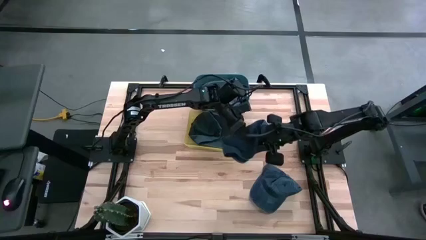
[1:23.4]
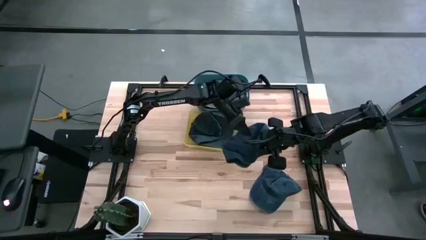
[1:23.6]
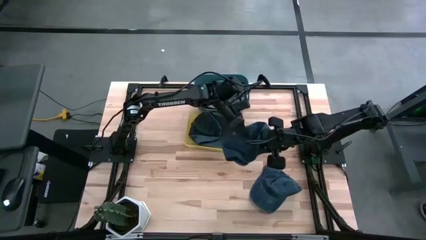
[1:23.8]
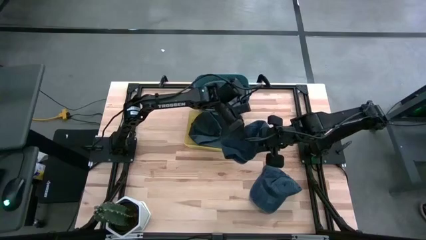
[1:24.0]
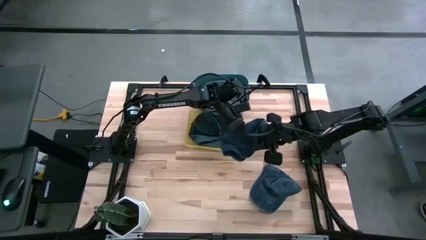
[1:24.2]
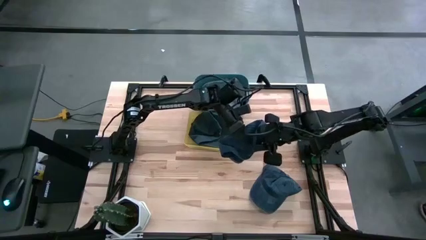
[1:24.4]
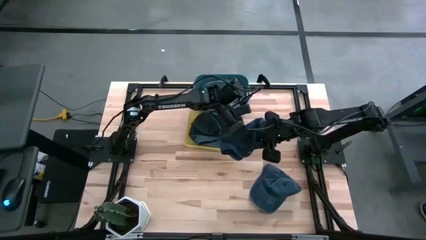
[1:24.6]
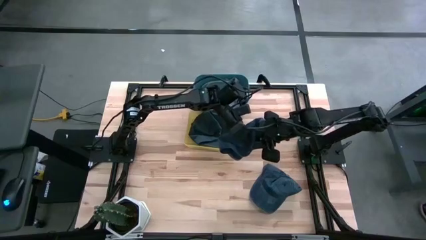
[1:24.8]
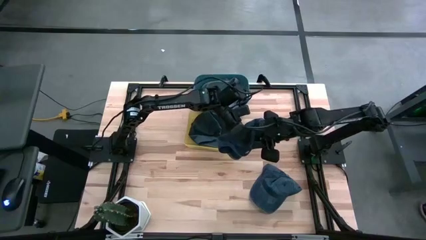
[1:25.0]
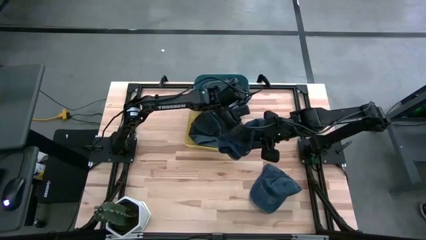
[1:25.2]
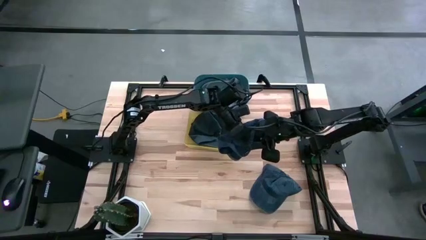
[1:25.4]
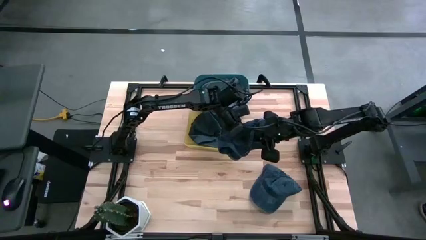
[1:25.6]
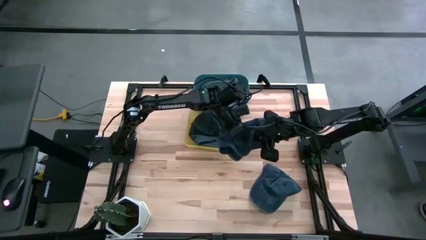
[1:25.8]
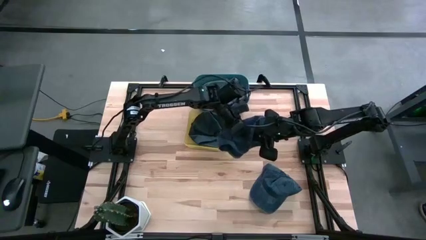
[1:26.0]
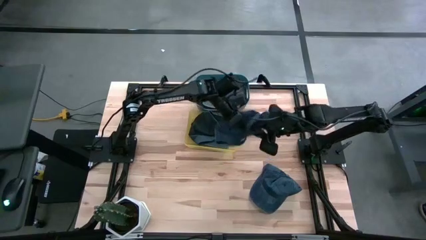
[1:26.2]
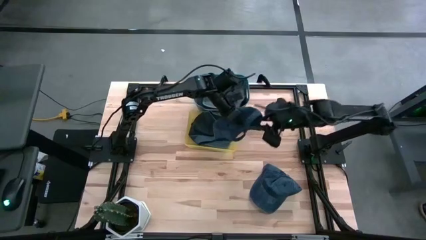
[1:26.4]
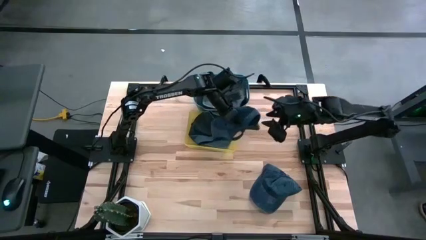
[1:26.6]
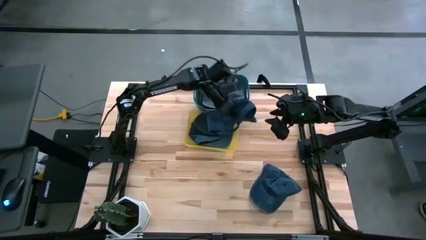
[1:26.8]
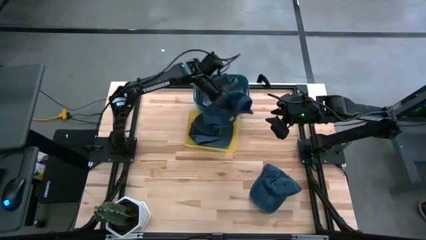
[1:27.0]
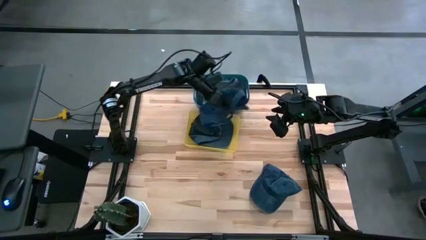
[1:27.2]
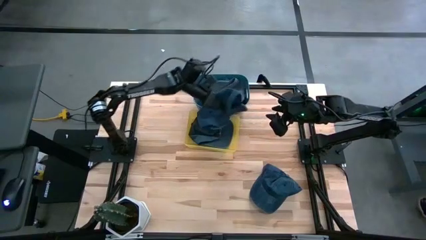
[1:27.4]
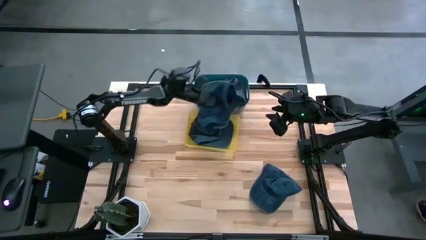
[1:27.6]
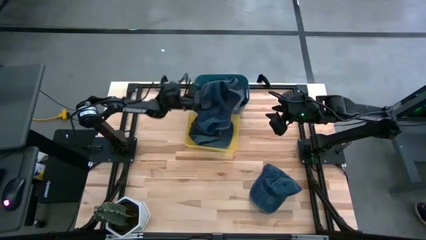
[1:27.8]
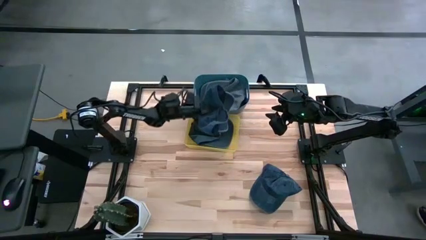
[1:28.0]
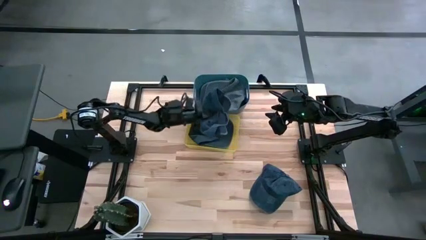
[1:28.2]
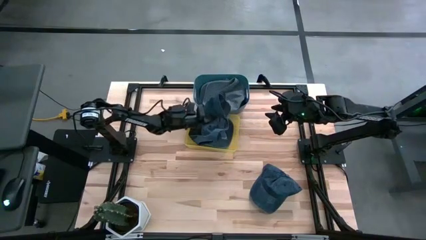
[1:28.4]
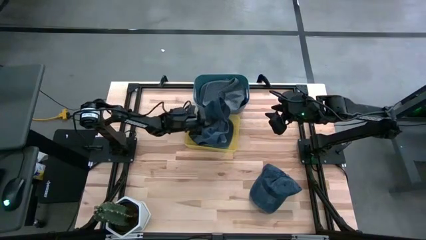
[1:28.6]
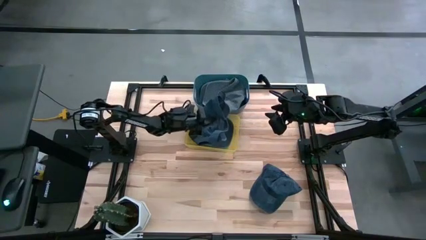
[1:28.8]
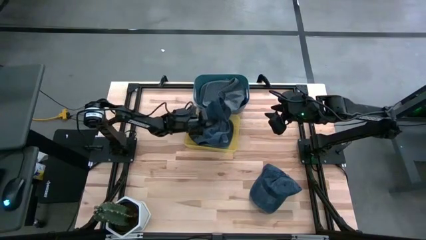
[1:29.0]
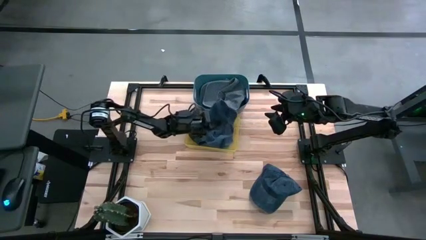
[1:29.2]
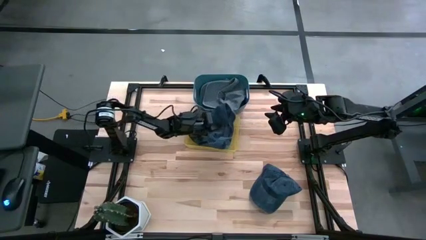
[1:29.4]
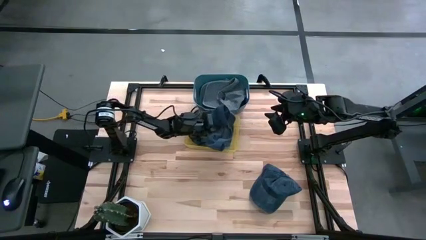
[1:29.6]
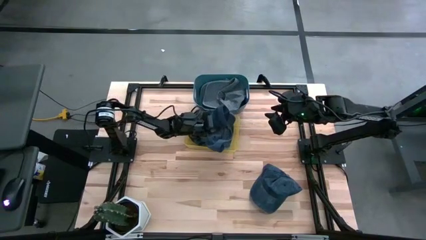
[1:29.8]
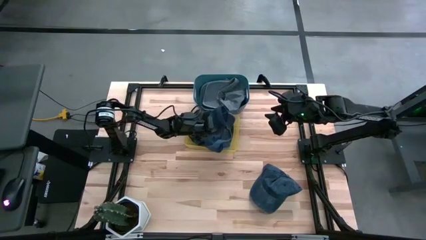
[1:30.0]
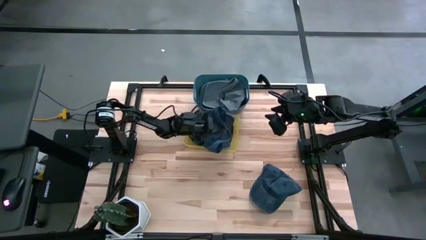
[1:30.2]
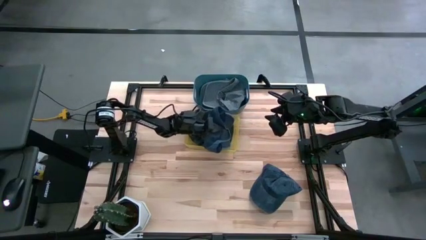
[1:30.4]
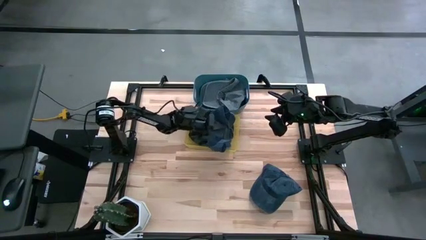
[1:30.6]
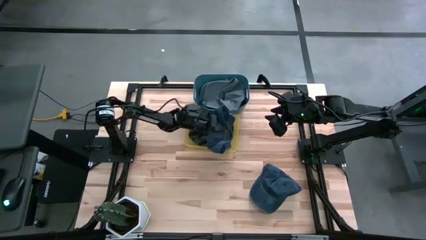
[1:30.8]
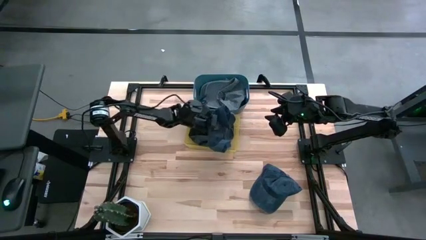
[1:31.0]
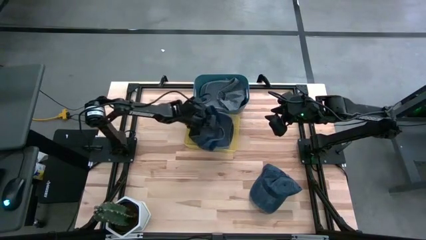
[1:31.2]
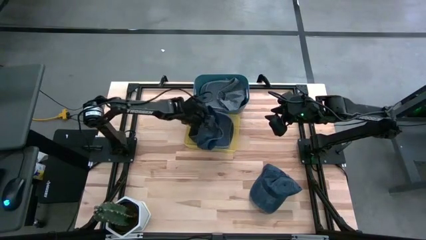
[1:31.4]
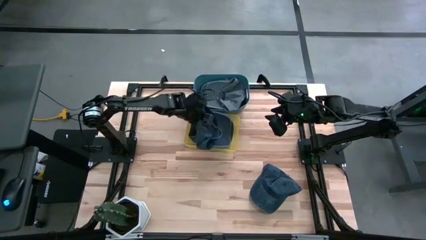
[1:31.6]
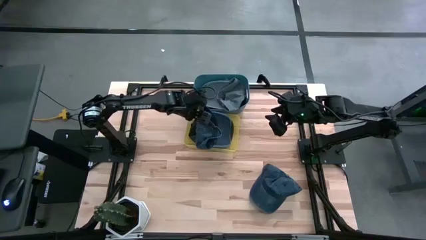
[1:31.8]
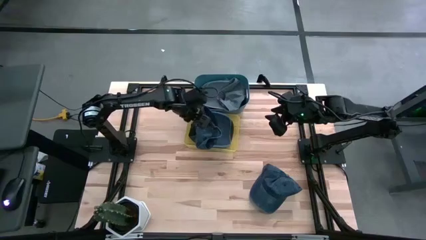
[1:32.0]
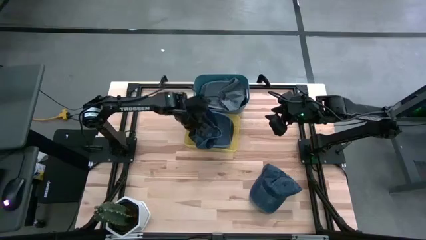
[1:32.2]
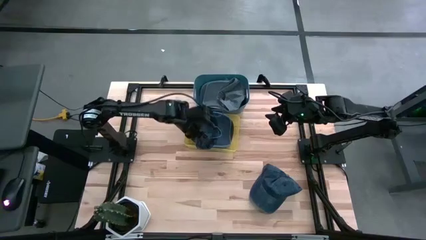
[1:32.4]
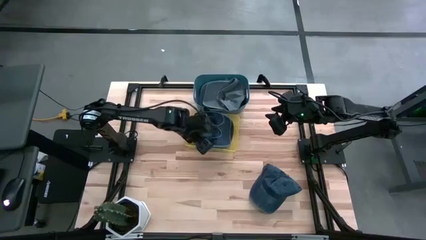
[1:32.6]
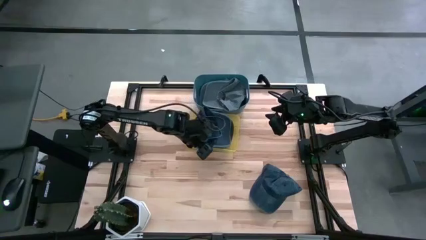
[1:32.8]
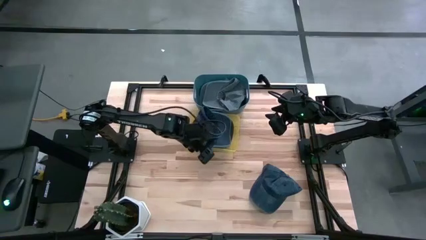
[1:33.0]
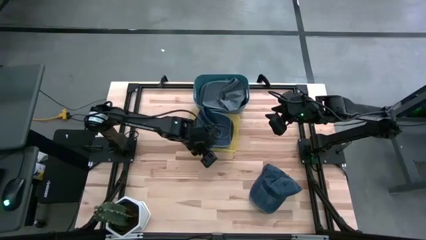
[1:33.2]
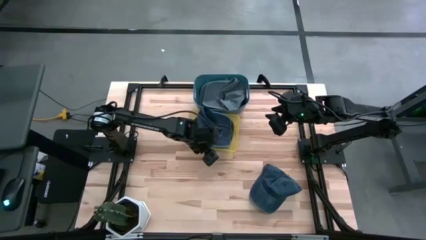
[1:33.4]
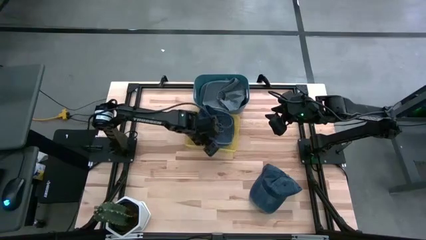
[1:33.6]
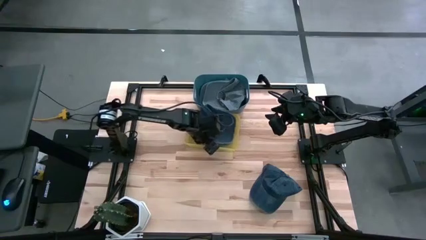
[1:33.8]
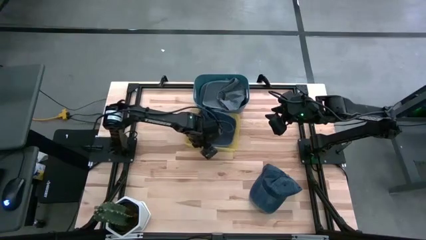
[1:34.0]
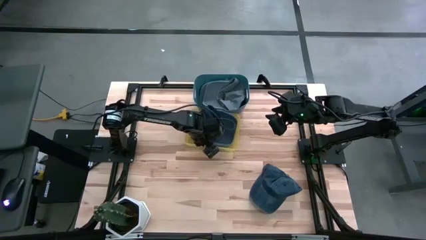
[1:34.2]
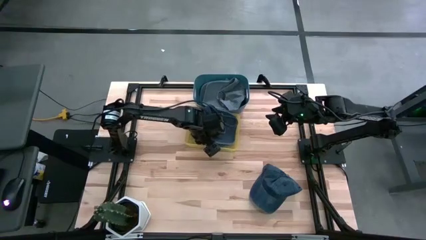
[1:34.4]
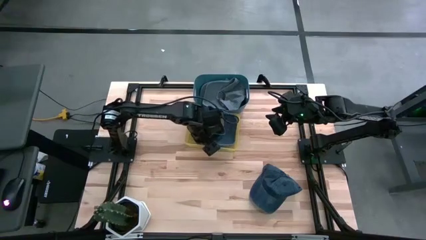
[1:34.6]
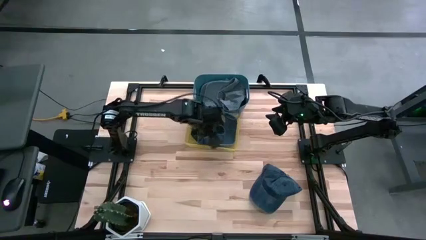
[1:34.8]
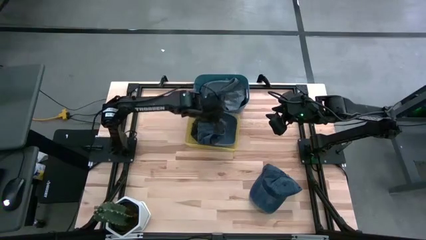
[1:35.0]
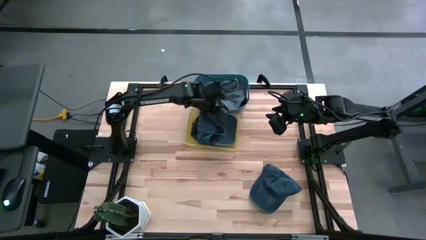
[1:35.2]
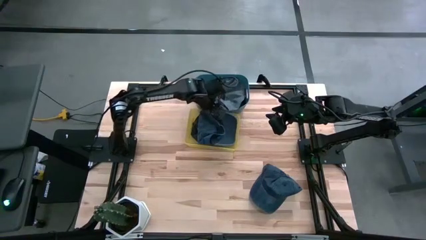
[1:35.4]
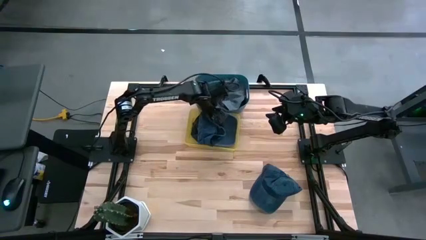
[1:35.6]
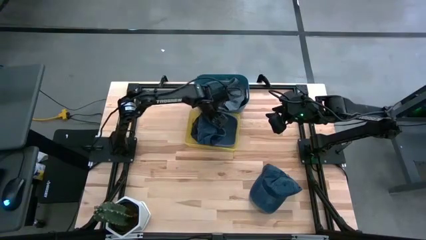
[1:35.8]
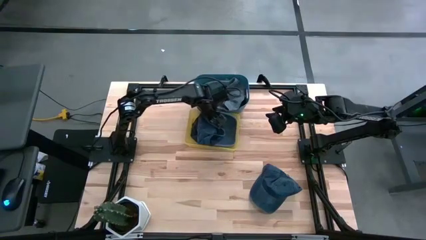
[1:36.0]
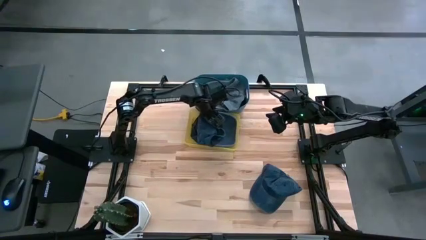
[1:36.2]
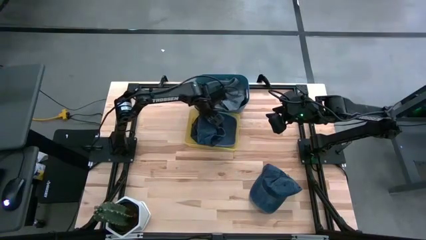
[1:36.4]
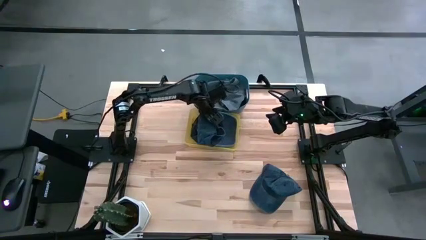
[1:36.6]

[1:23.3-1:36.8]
Task: Pick & Place hat
Put the left blue cap into the yellow bin
